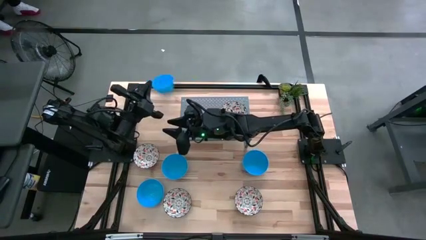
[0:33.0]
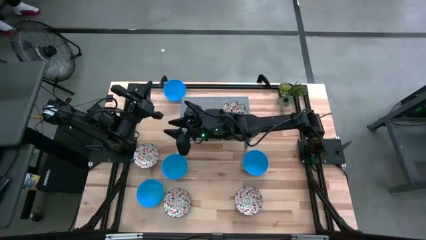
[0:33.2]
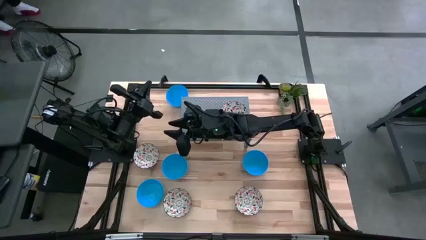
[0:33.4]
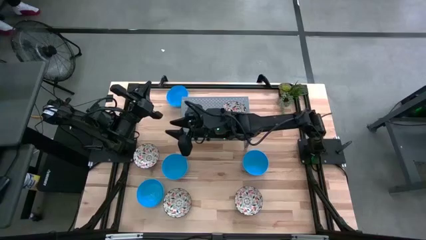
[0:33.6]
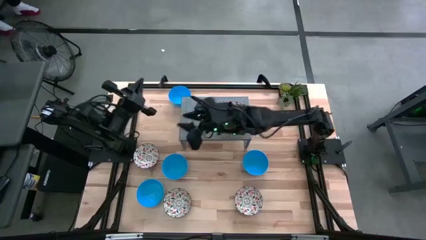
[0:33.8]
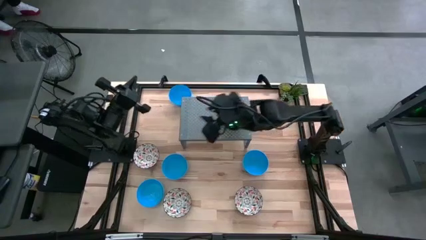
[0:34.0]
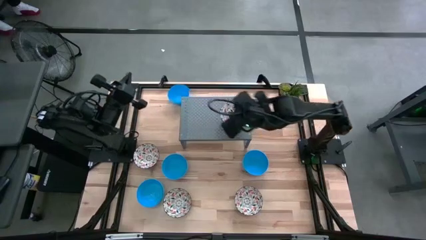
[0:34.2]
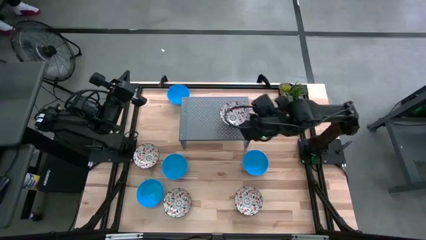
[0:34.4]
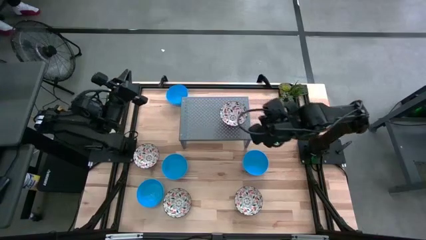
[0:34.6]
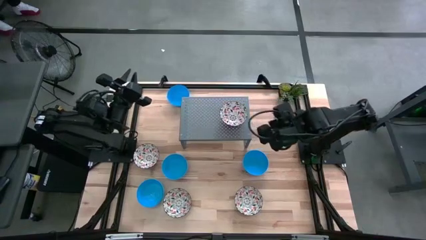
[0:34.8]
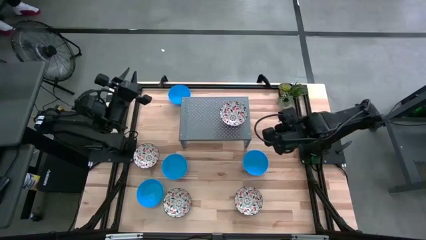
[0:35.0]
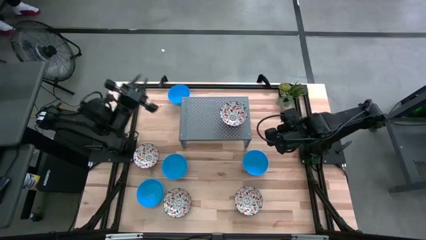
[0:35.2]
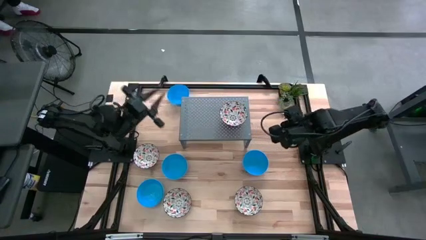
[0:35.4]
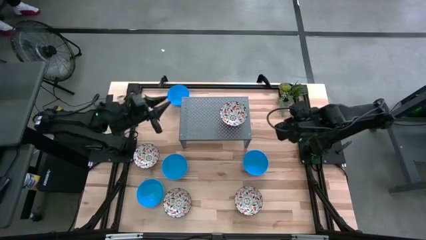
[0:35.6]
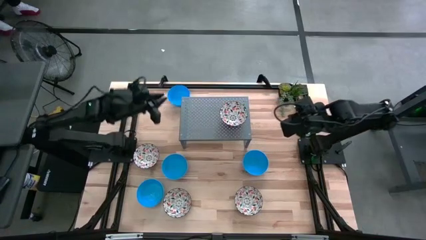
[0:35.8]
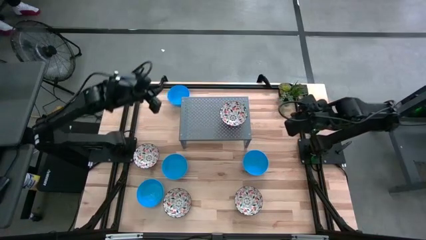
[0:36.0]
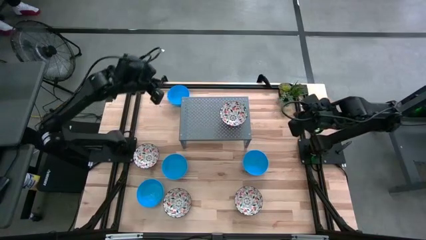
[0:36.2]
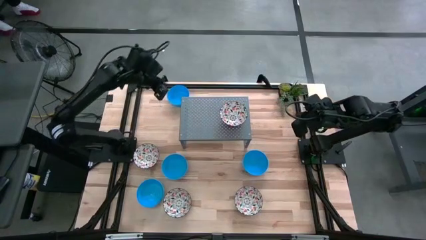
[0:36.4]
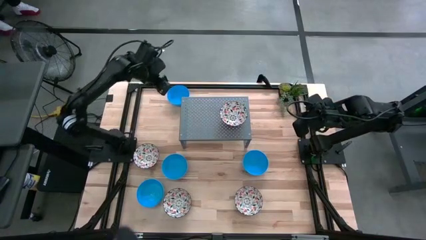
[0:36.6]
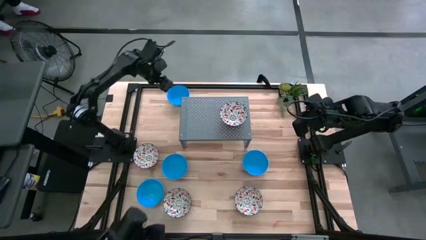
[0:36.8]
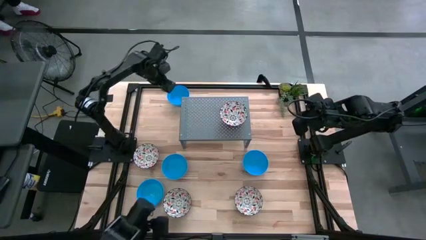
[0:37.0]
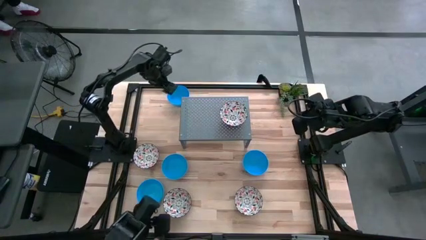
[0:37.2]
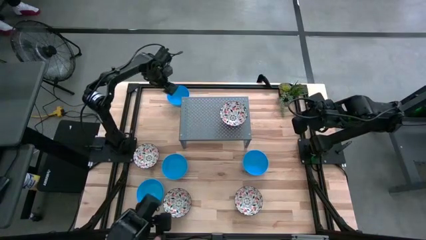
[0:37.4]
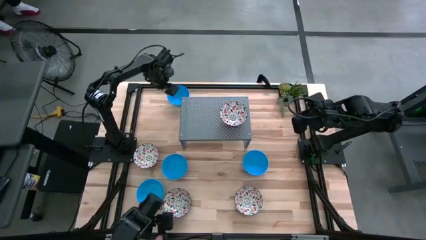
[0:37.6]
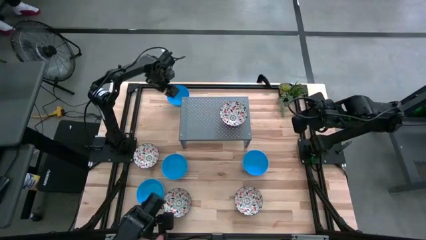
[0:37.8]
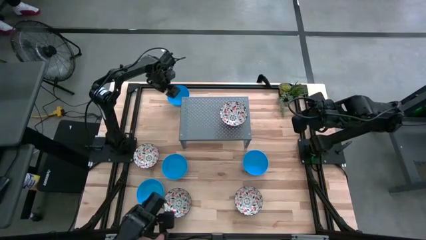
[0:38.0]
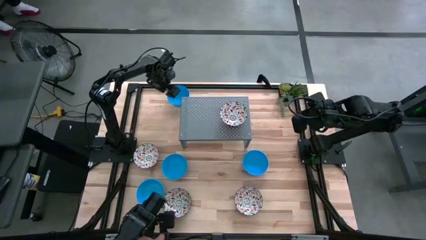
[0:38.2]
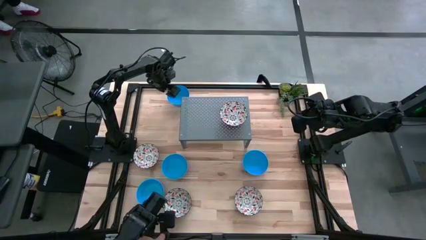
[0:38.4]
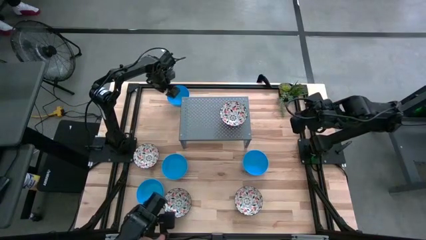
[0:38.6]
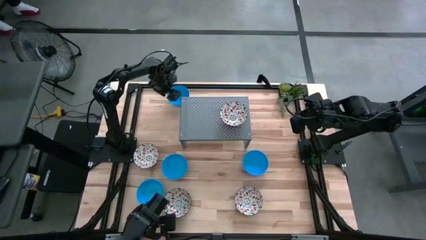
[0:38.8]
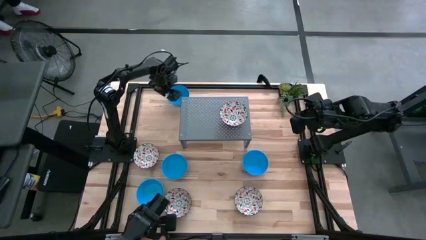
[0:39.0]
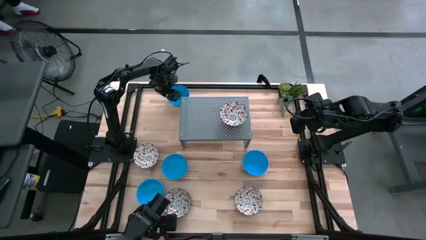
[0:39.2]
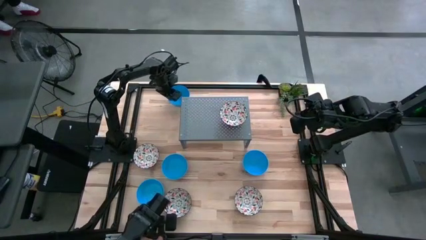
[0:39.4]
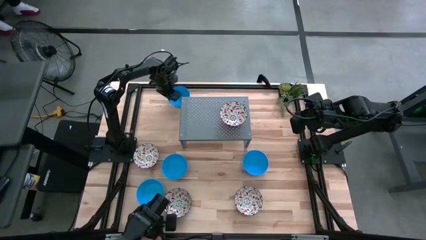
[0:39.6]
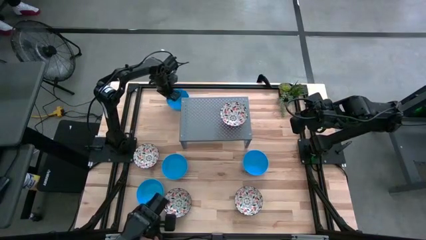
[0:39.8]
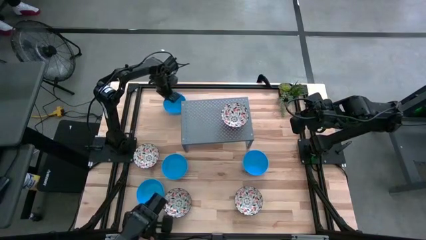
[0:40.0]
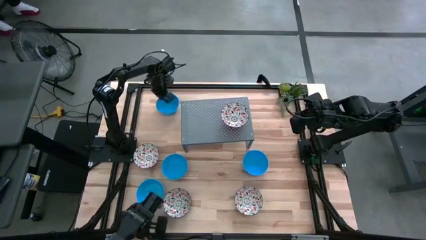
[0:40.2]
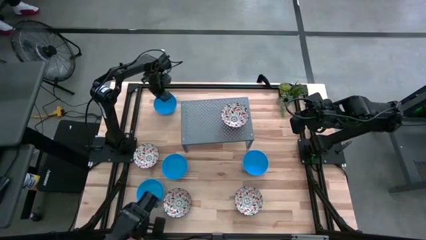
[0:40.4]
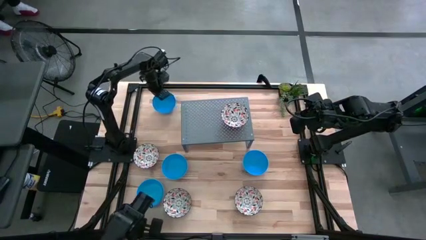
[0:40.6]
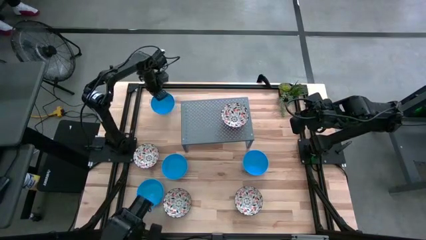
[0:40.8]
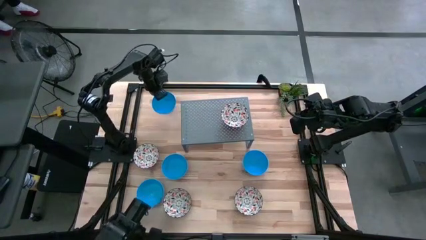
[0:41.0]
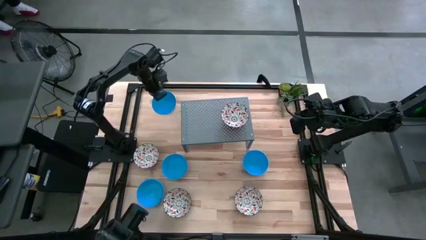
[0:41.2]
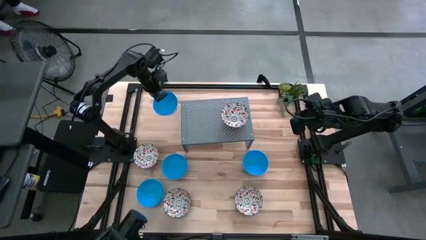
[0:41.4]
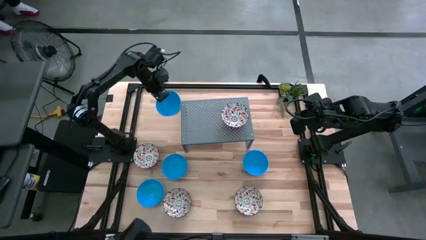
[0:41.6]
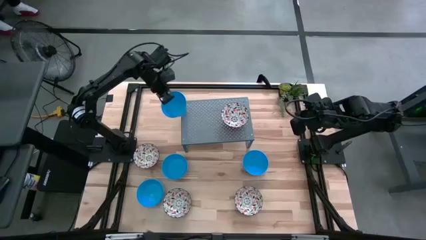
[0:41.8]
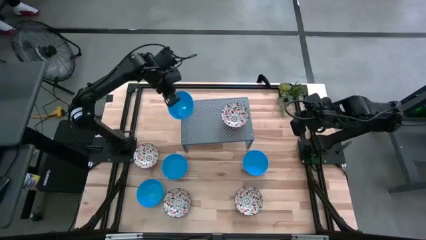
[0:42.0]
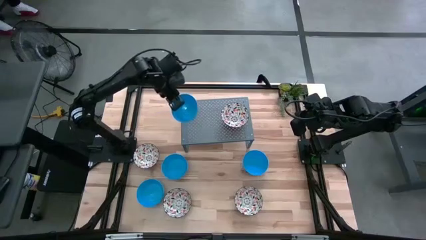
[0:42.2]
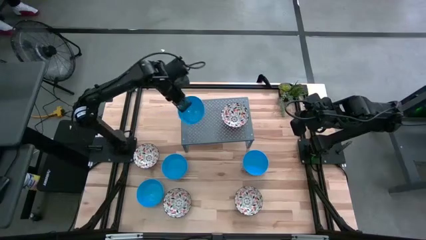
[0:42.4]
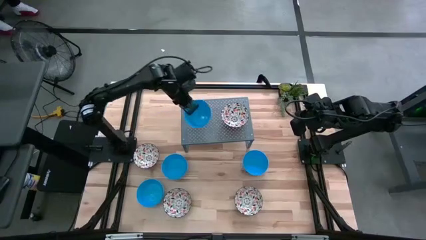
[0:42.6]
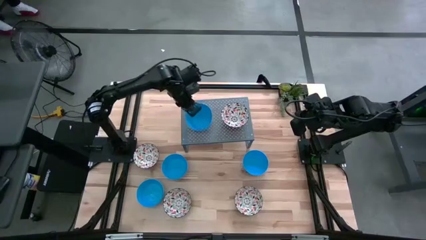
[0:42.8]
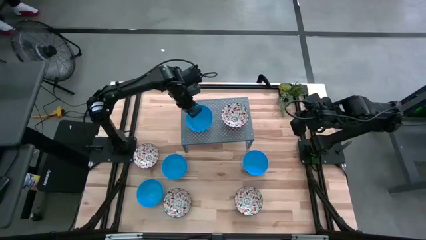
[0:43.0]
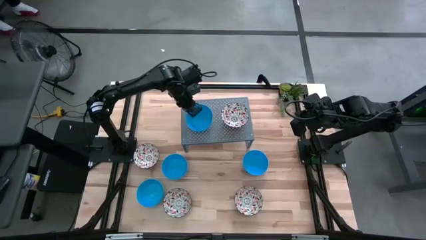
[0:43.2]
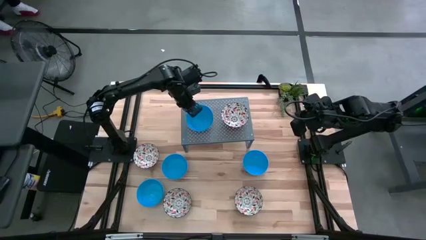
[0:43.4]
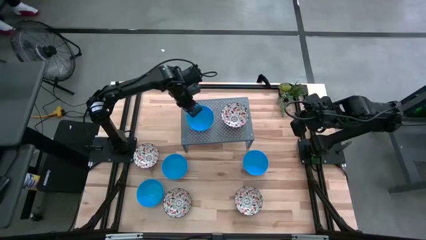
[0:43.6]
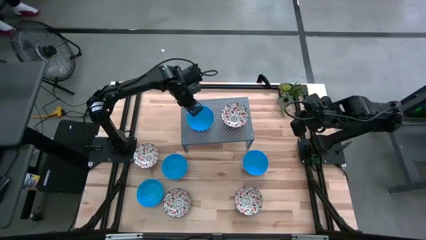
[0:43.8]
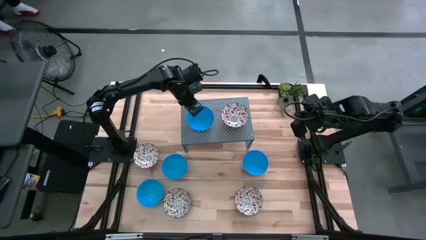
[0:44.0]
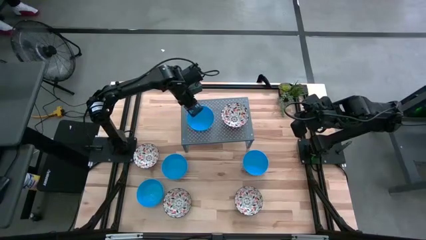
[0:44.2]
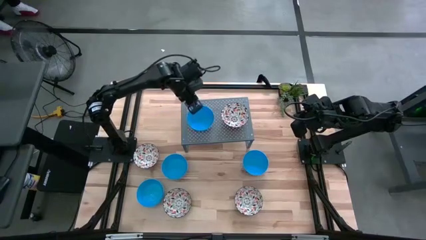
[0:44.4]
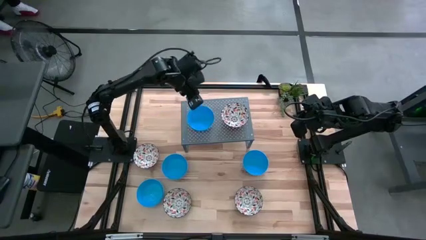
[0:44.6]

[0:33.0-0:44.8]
Task: Pick & Place Mini bowls
Put the blue bowl on the shelf
